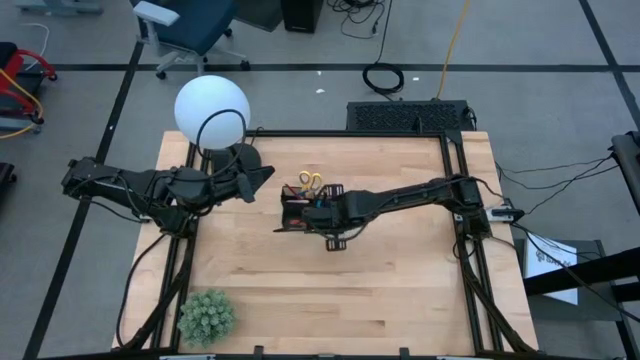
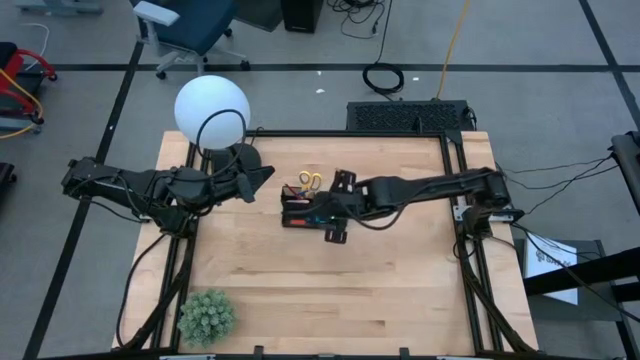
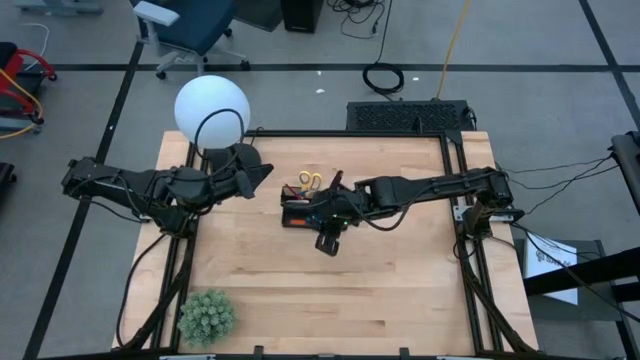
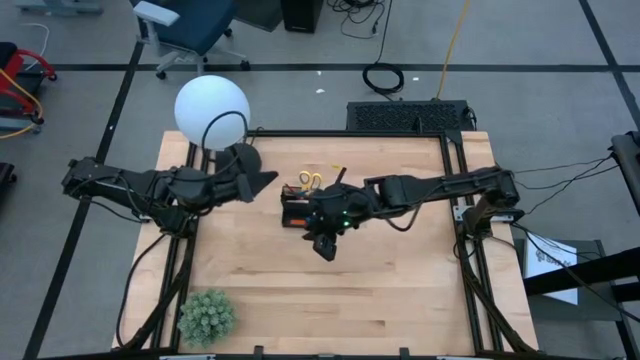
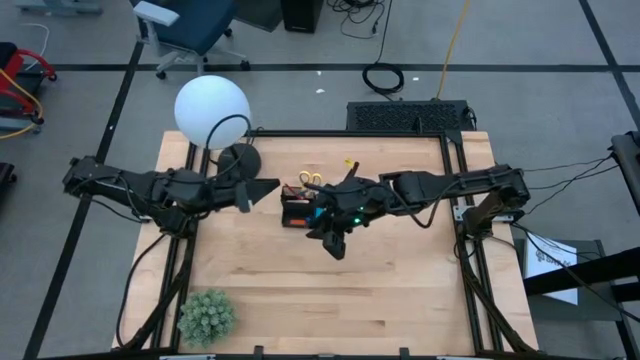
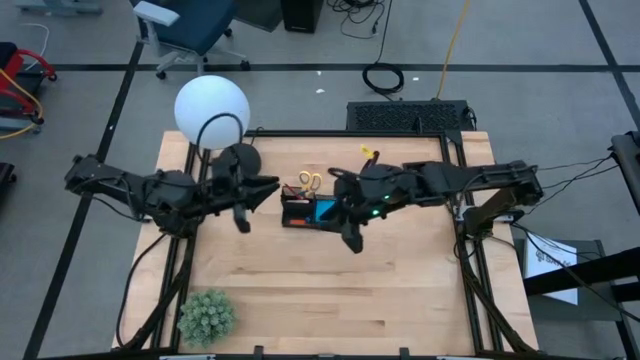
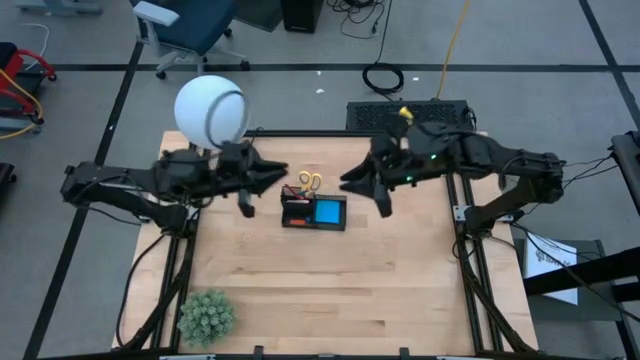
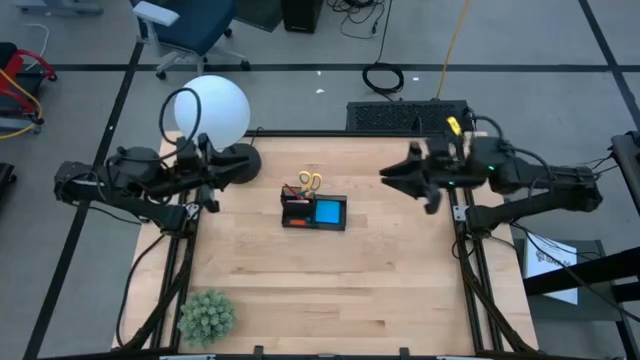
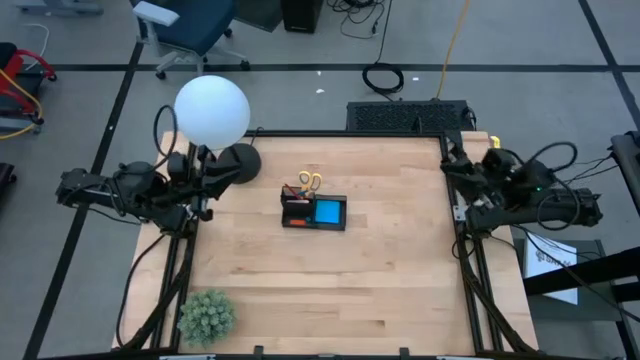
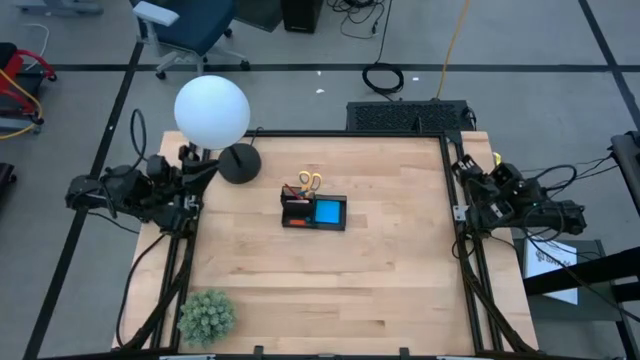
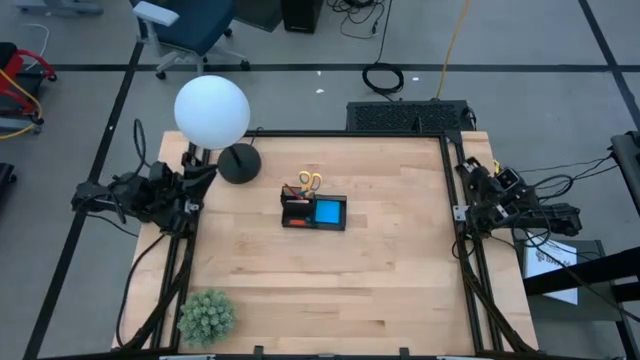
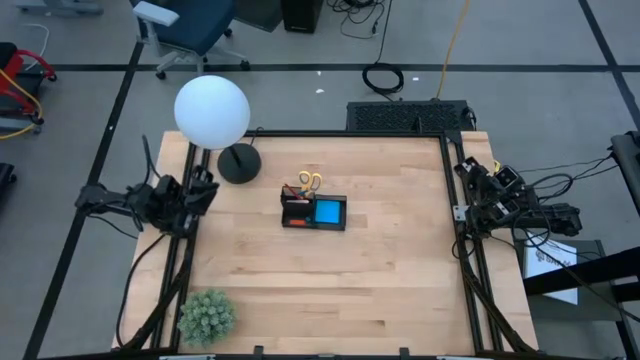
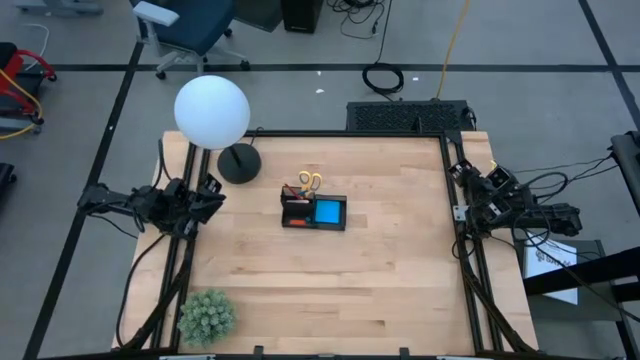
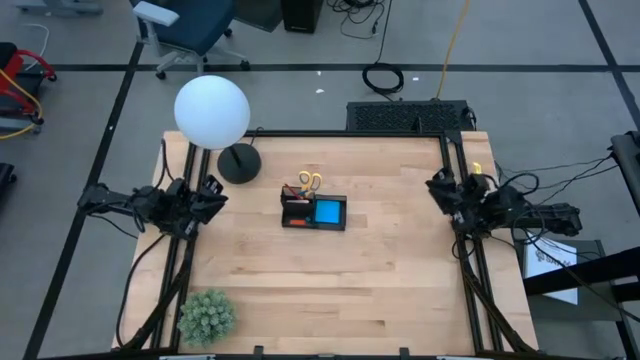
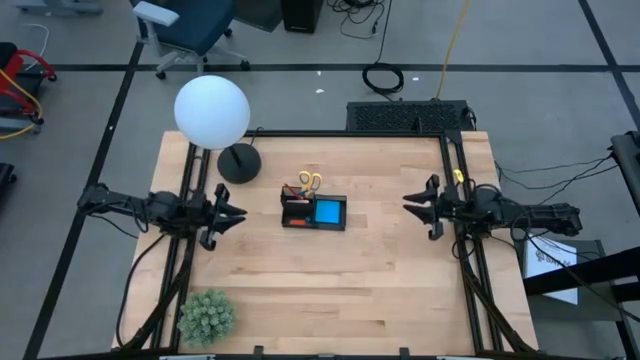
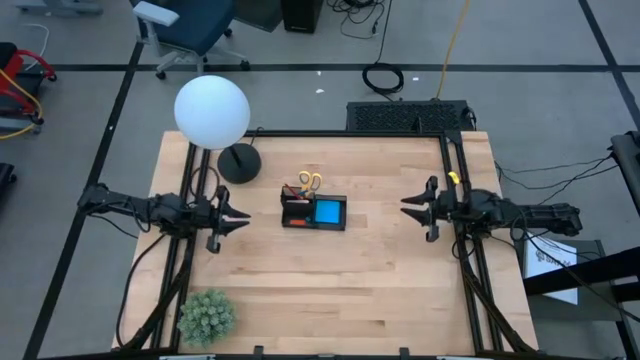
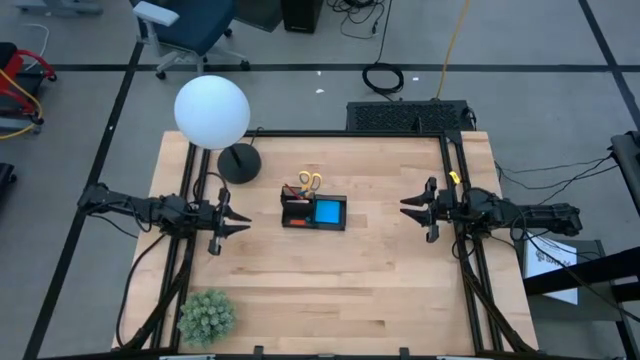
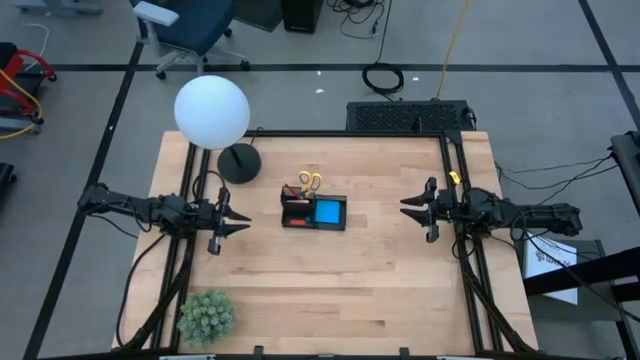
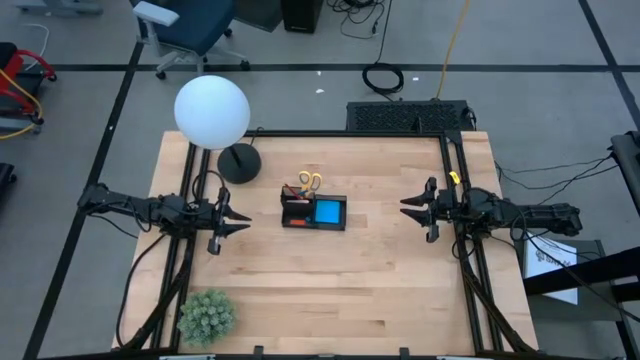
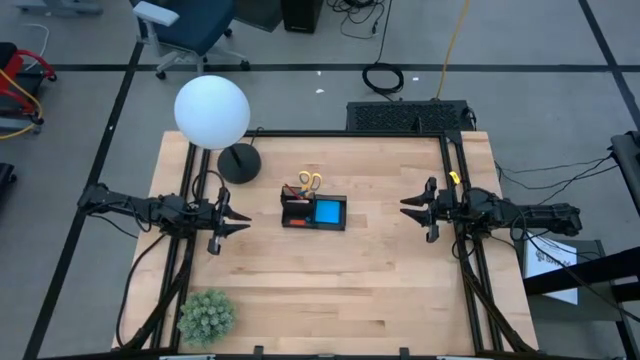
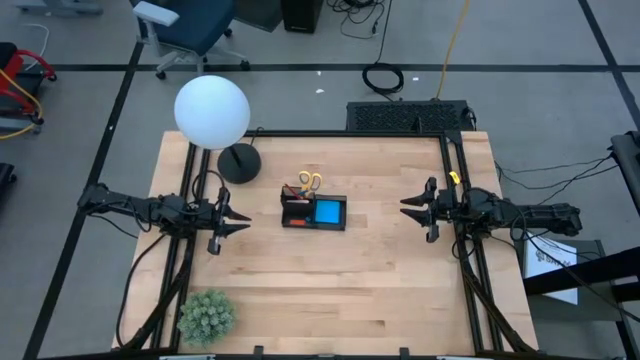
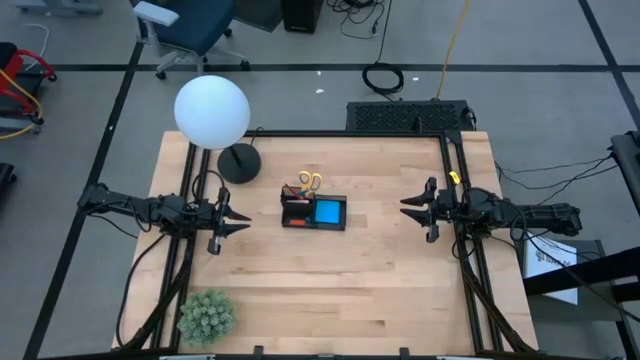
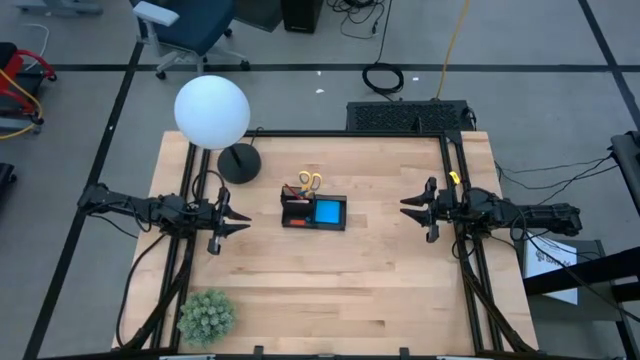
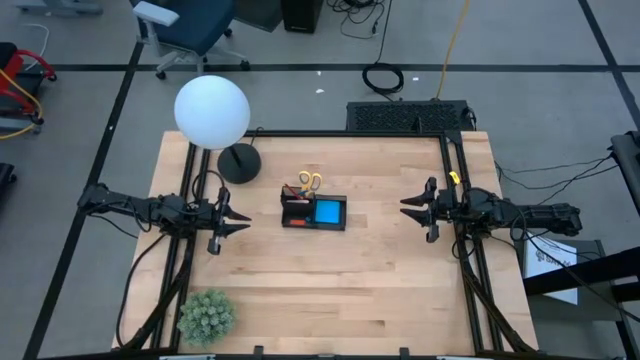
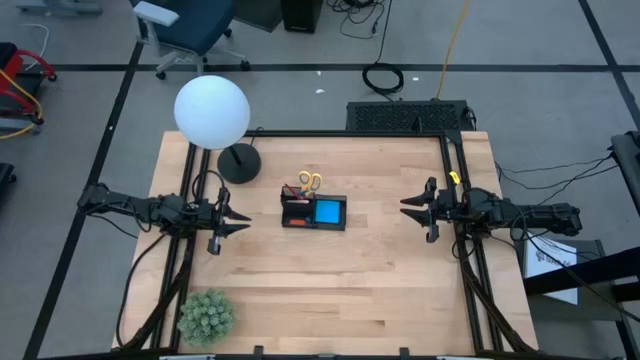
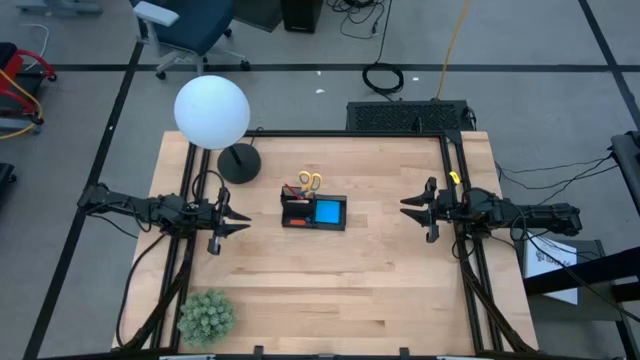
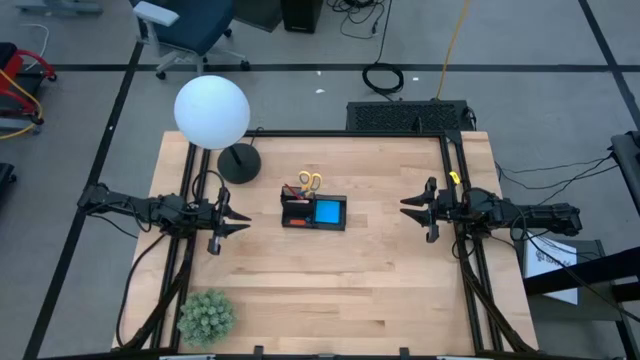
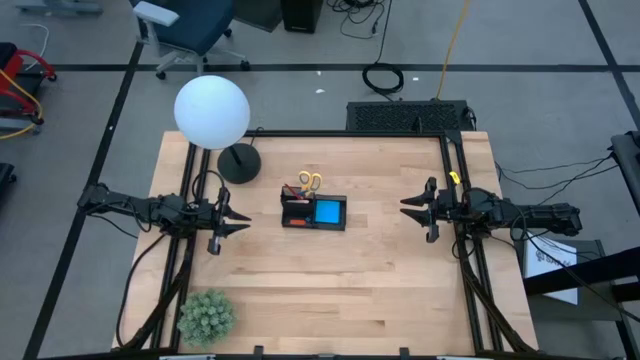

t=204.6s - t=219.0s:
Task: Pick and place office supplies into organizer
Return to Home Position
